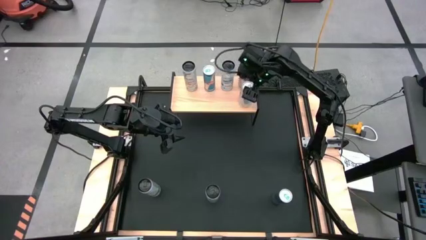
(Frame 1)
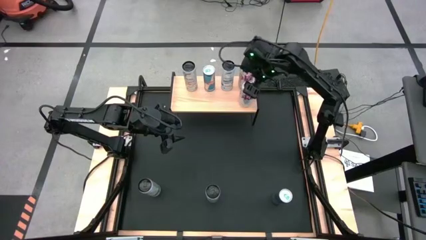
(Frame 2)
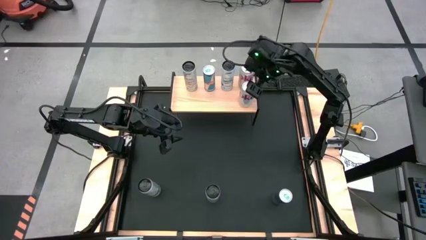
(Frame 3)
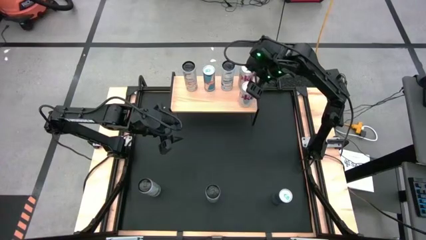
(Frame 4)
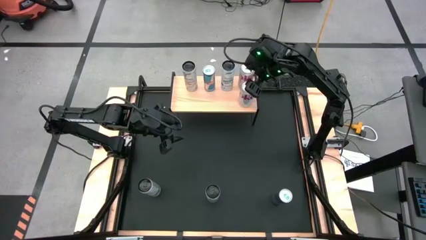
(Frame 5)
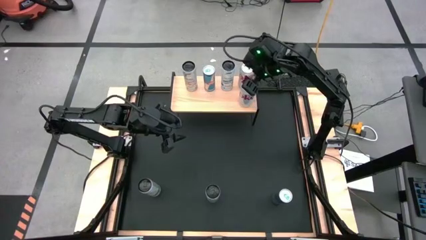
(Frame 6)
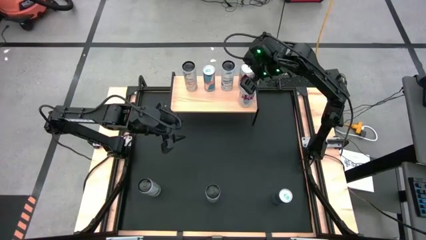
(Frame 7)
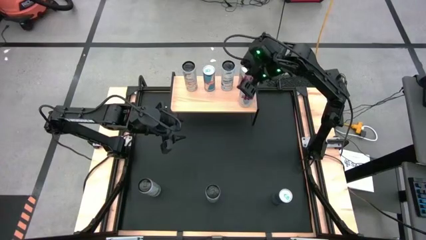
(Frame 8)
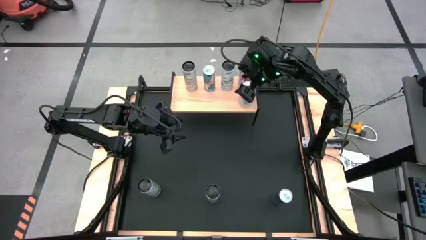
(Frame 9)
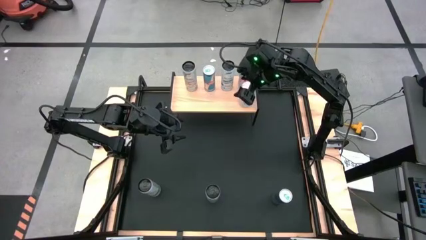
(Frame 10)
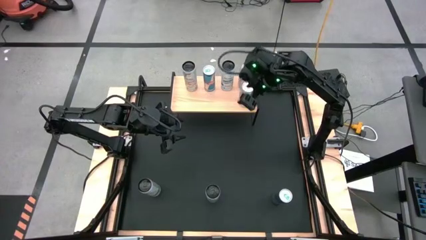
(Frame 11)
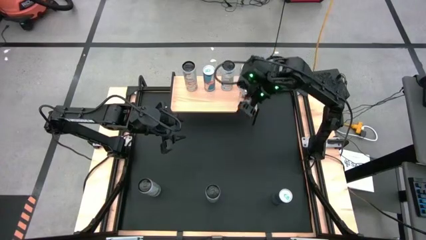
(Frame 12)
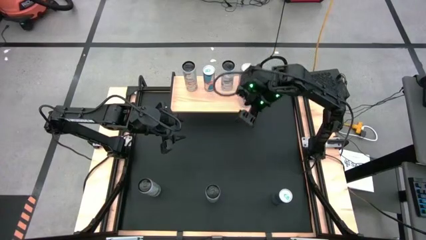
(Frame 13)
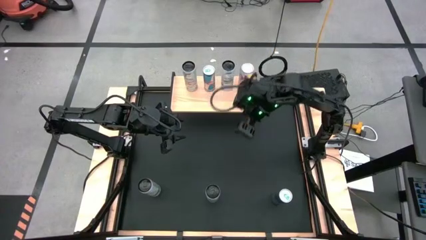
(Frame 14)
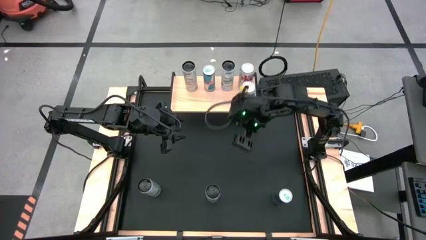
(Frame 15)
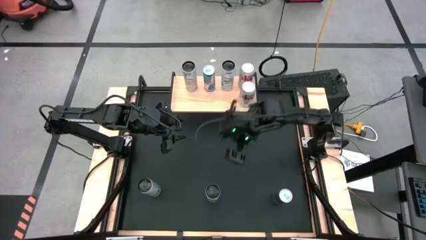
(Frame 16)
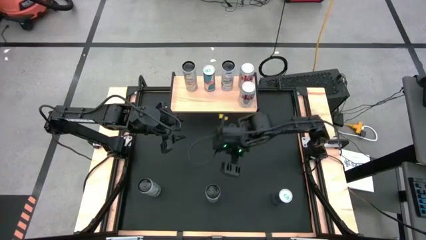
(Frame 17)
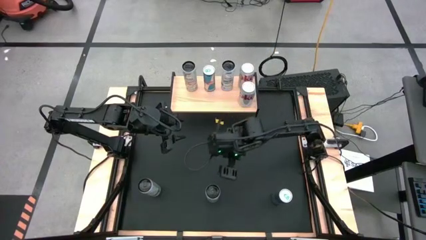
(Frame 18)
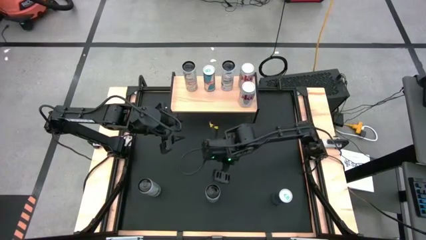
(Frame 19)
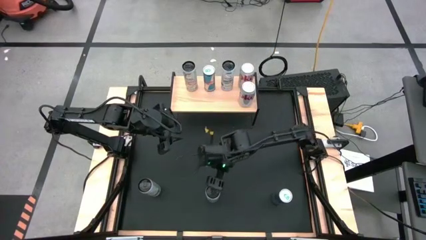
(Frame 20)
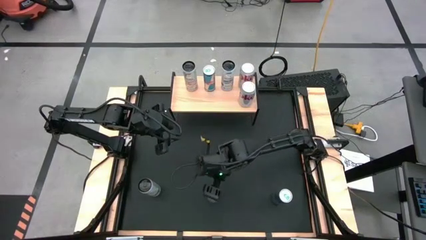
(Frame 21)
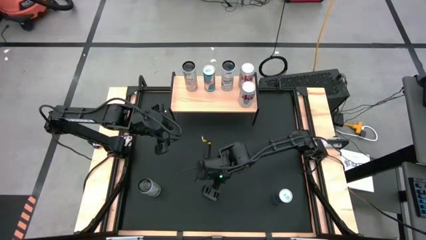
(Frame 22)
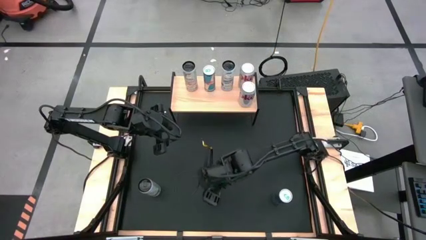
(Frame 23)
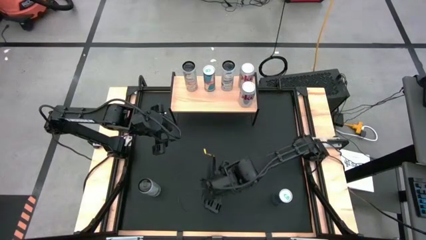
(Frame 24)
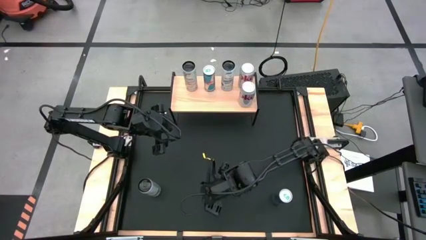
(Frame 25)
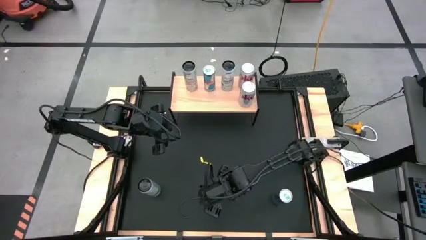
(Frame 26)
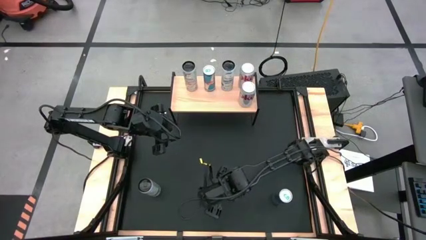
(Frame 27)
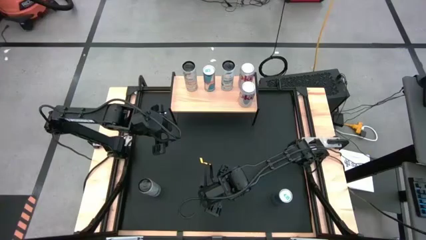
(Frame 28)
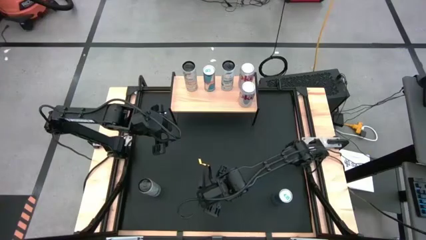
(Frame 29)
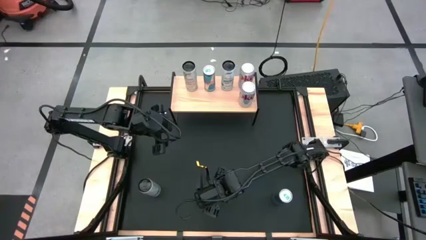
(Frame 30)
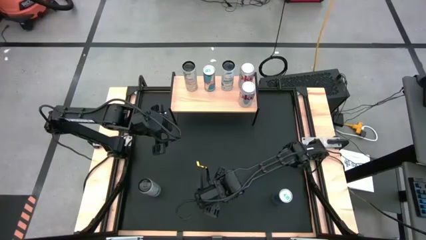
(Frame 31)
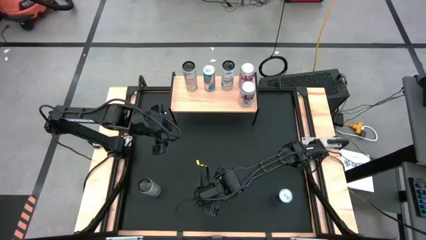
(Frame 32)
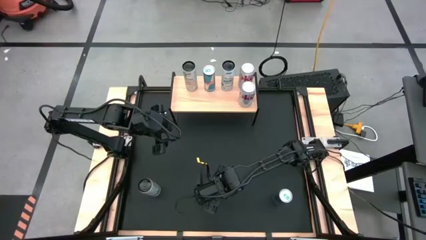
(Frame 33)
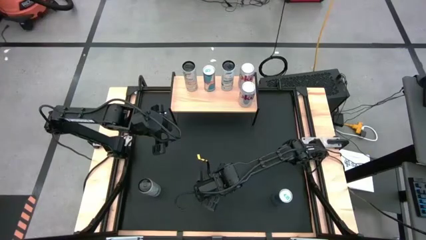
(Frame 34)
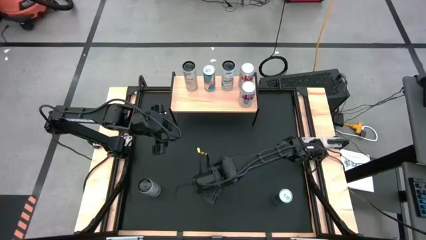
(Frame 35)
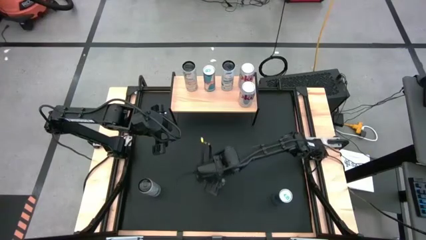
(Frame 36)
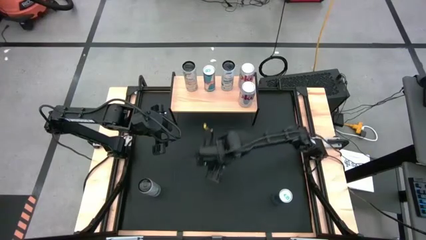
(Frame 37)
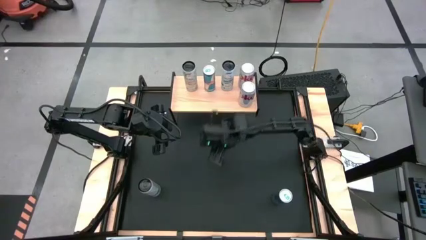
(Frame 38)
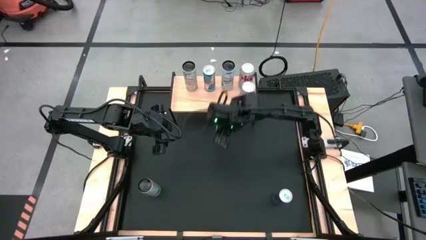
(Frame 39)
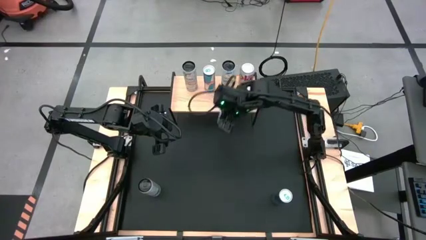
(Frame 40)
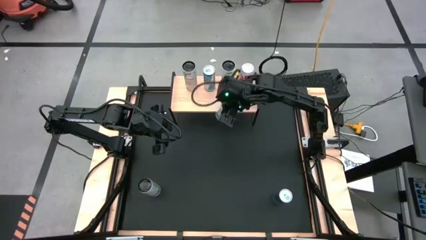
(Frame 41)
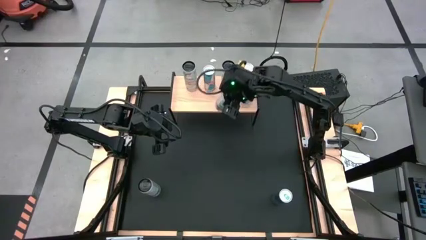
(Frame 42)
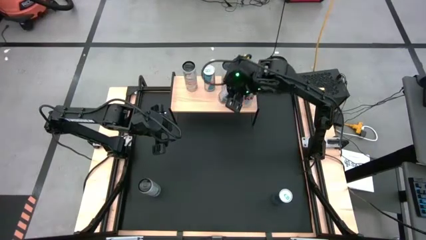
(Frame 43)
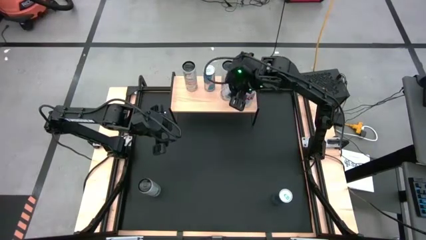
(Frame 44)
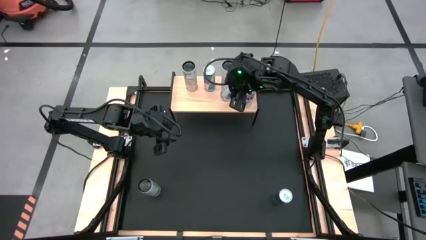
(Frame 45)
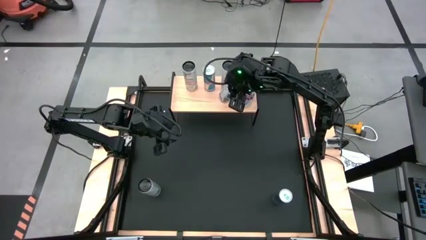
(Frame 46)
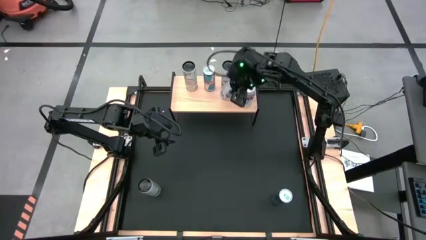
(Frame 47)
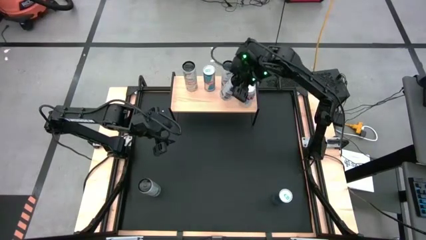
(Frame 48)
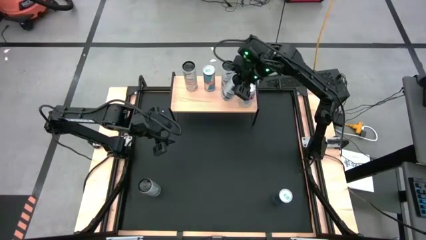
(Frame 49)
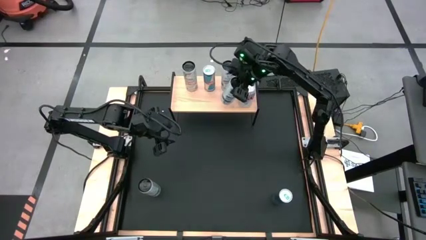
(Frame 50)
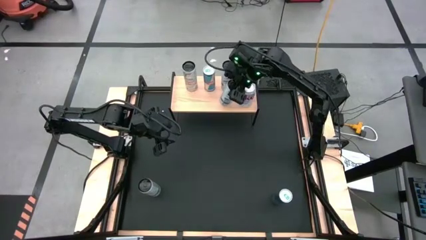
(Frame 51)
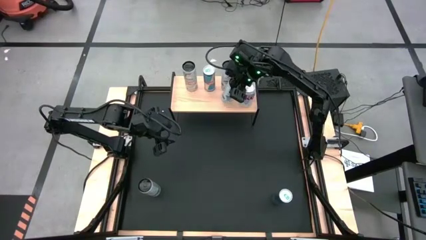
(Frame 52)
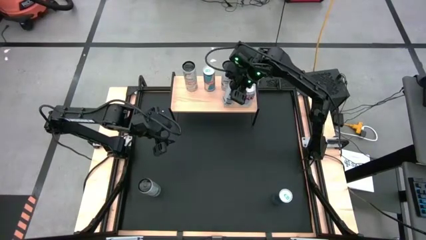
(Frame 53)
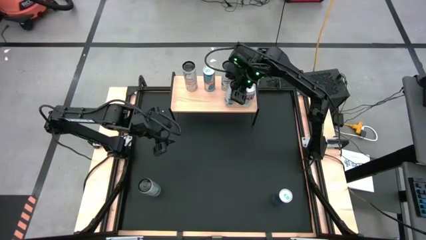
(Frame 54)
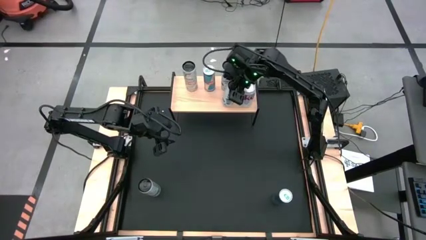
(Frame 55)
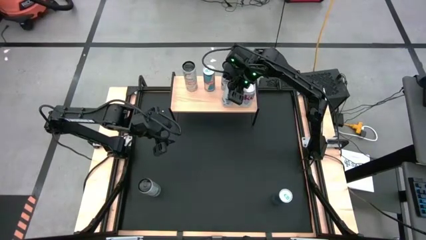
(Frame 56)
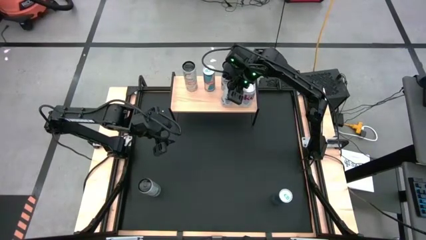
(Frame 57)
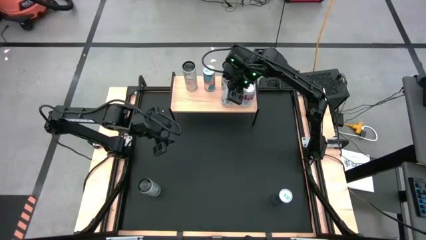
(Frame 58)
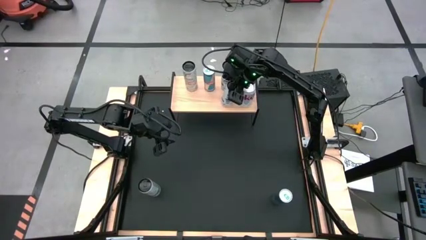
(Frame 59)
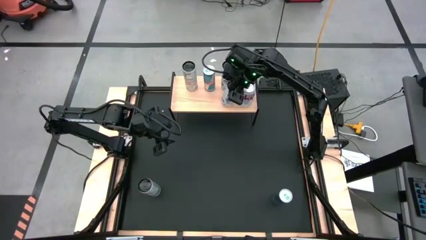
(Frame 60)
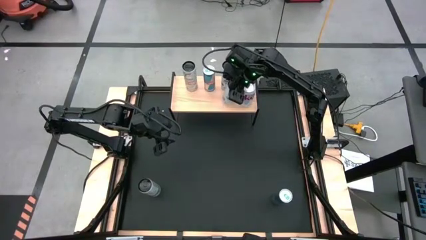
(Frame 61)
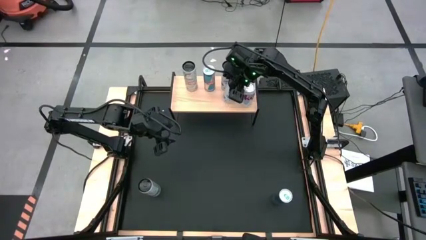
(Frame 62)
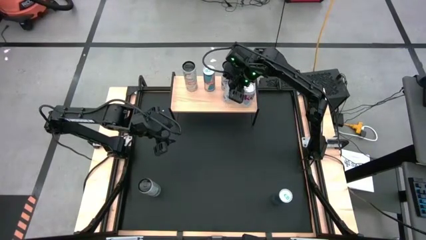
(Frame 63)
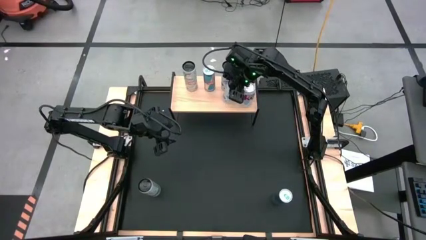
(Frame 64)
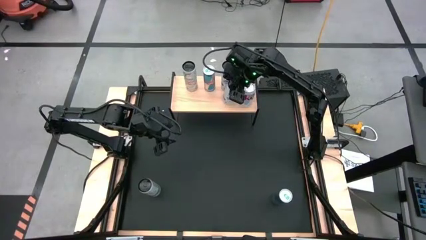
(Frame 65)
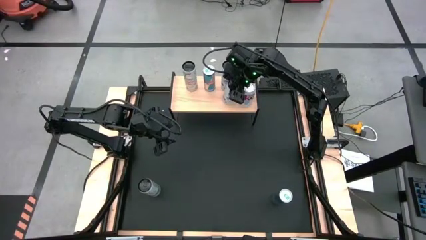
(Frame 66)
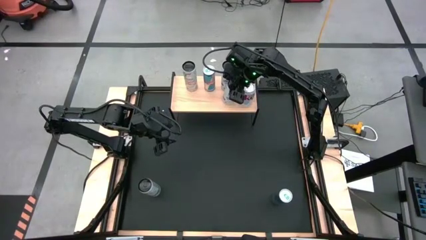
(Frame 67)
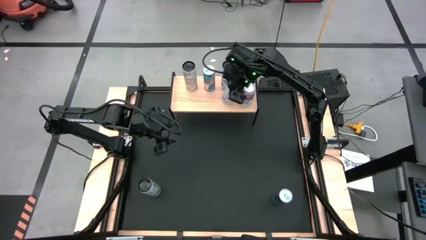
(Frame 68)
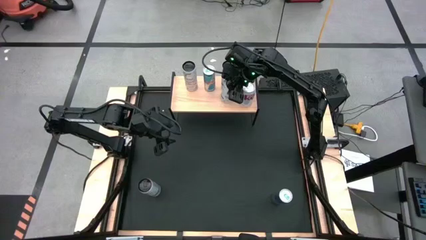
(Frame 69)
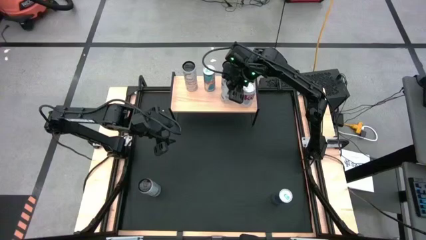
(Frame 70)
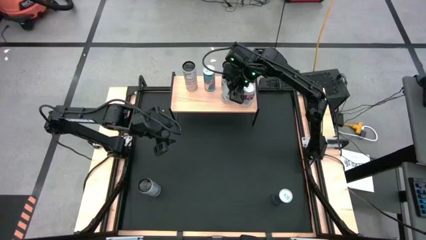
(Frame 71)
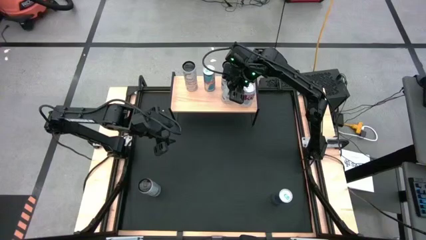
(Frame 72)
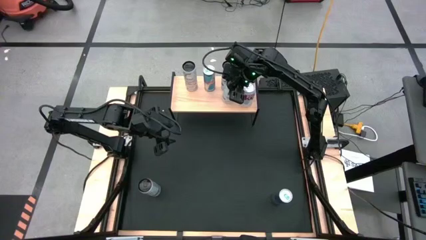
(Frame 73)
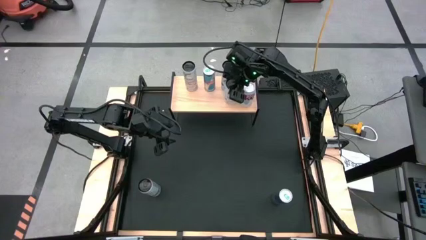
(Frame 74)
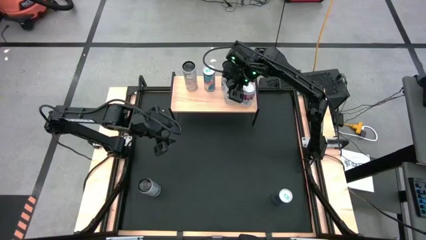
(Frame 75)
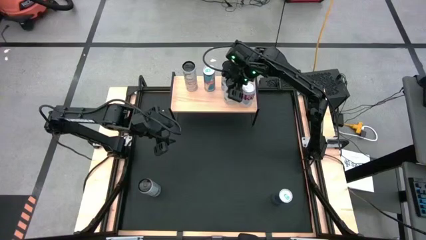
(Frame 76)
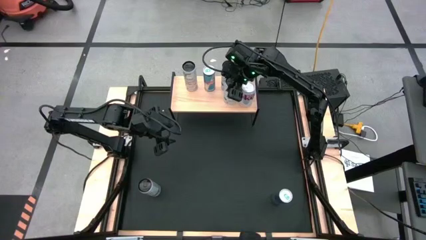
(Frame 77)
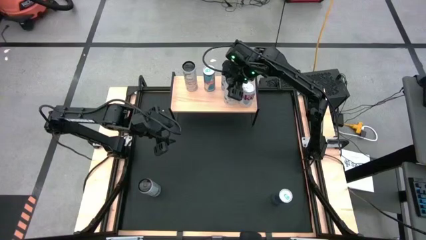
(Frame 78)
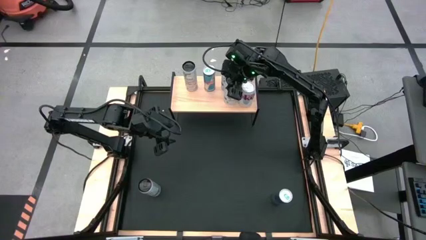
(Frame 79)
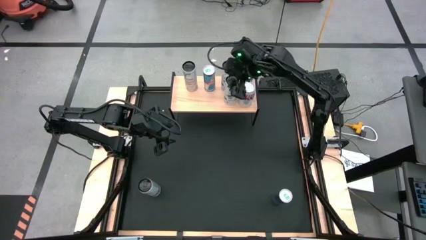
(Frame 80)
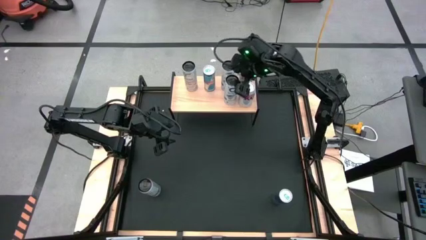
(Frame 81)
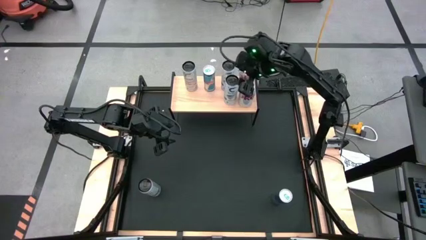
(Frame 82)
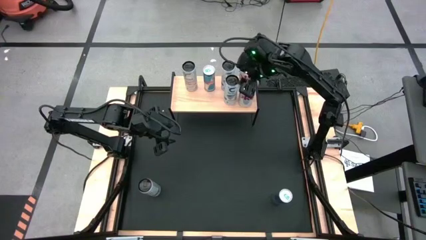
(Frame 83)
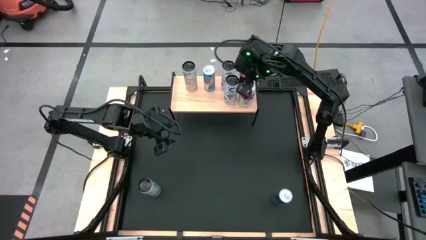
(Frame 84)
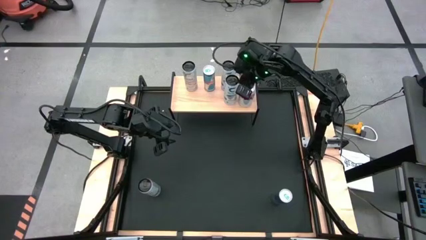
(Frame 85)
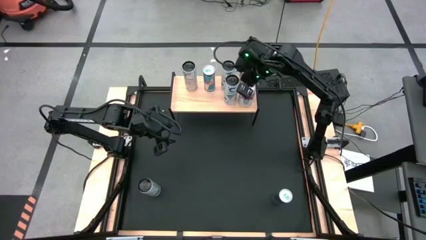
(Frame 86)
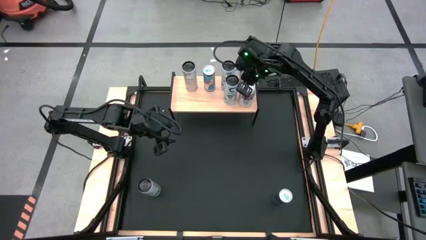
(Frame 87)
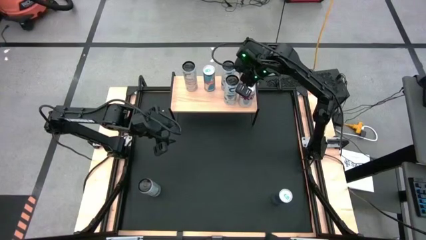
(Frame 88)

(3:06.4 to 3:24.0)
Task: Place canned beverage on shelf
Put the right white and black soda can on the shelf

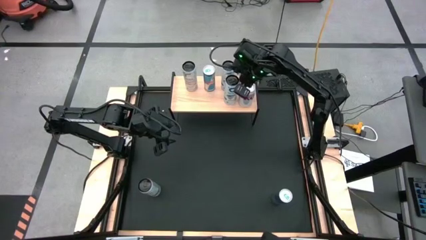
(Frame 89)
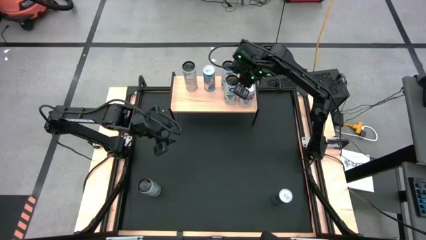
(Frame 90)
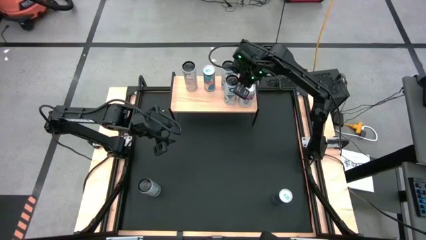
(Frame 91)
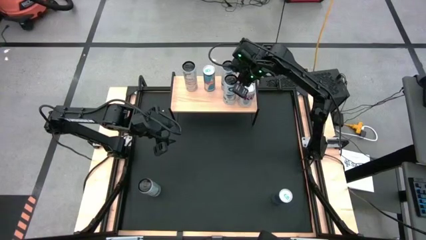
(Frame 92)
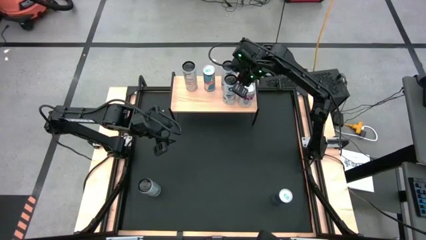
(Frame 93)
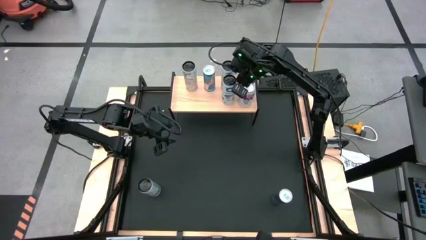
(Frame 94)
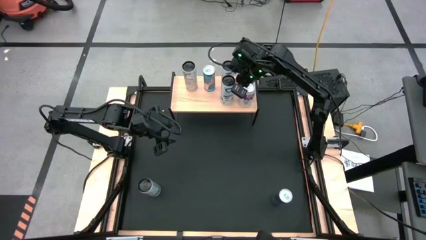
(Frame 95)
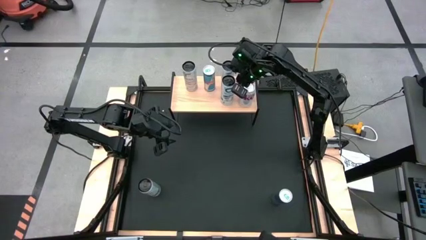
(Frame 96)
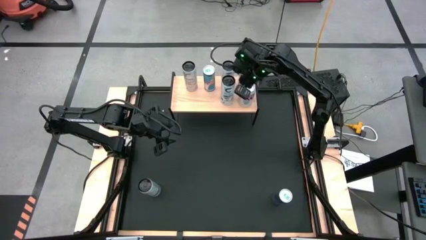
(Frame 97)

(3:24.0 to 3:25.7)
Adjust the white and black soda can on the shelf
